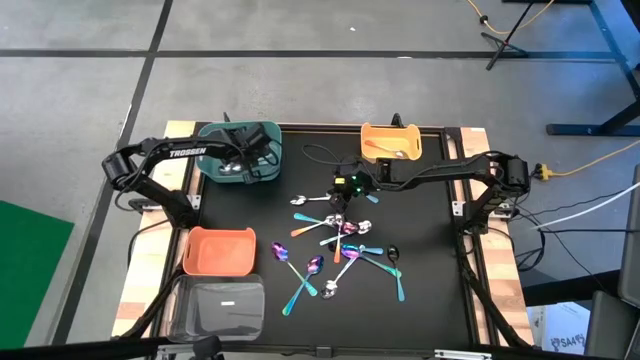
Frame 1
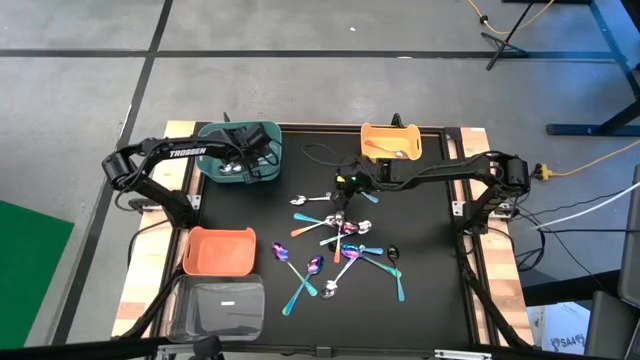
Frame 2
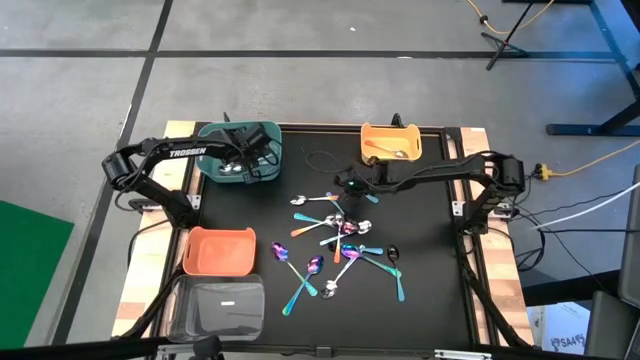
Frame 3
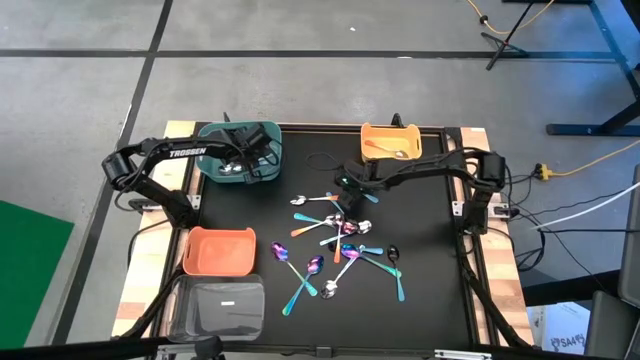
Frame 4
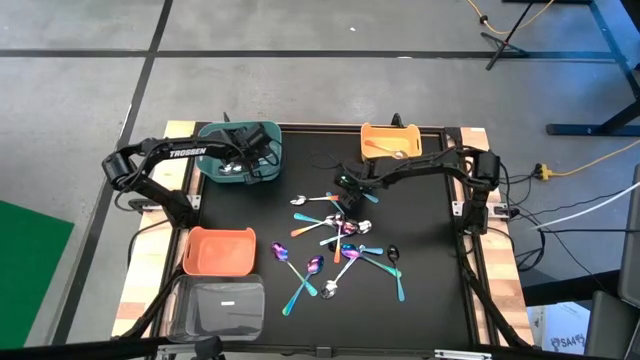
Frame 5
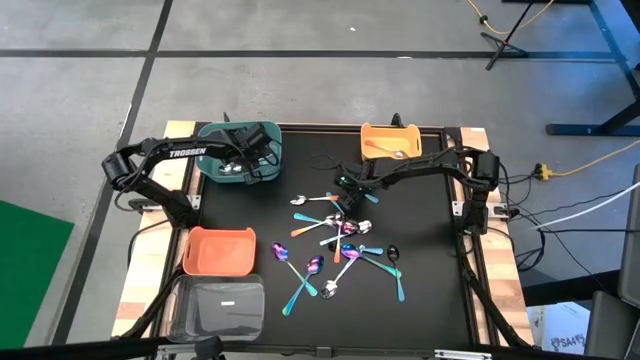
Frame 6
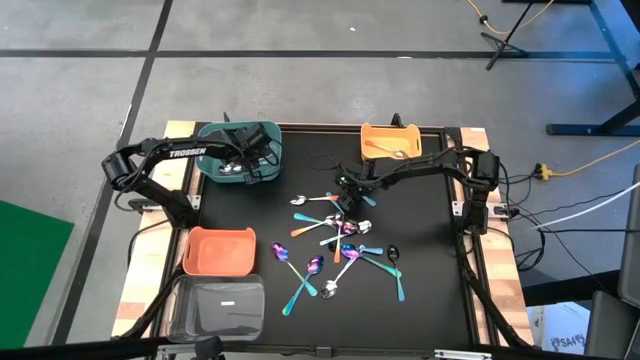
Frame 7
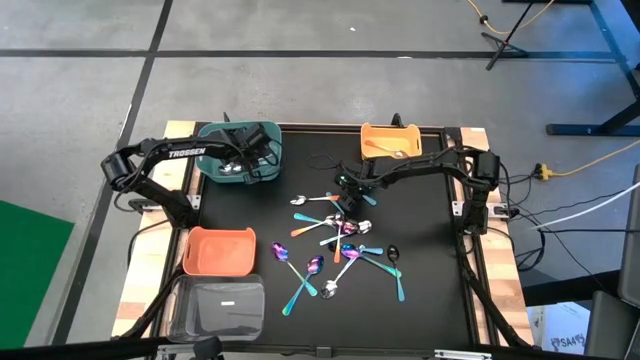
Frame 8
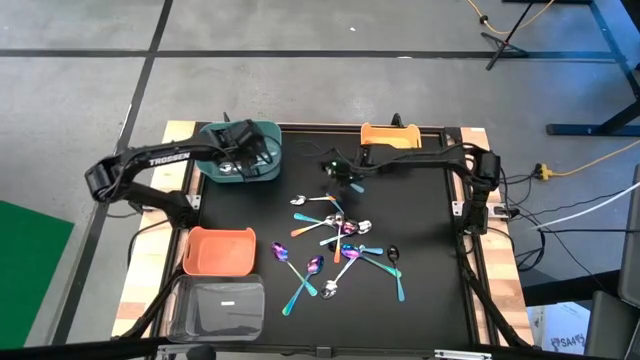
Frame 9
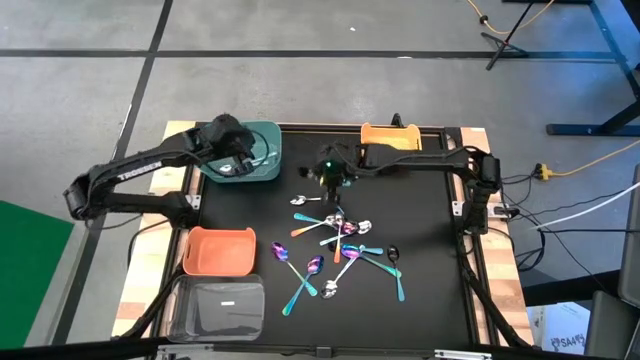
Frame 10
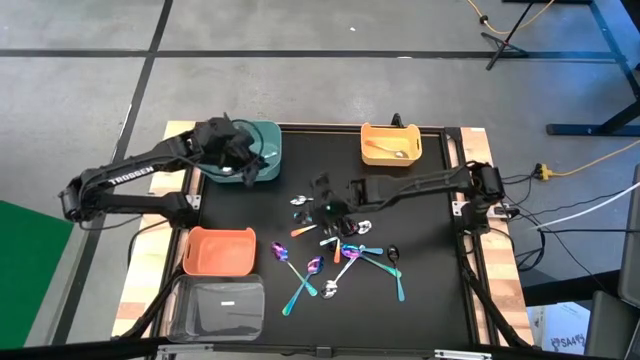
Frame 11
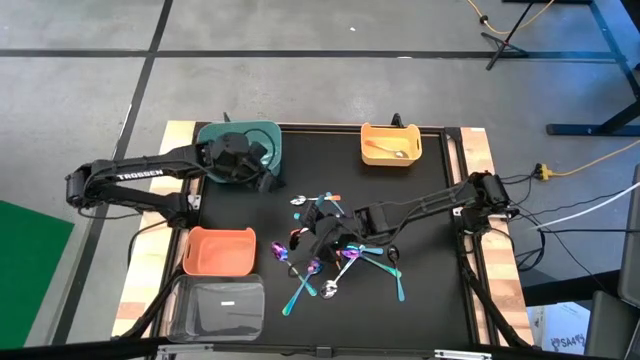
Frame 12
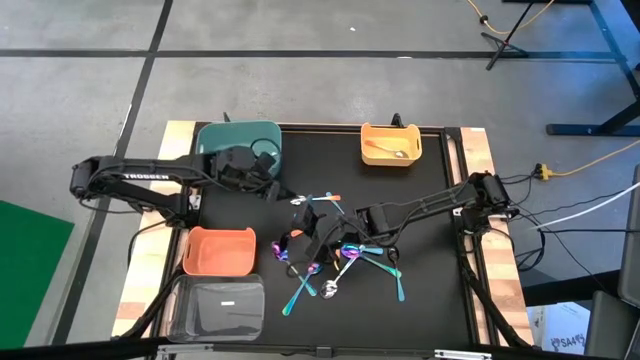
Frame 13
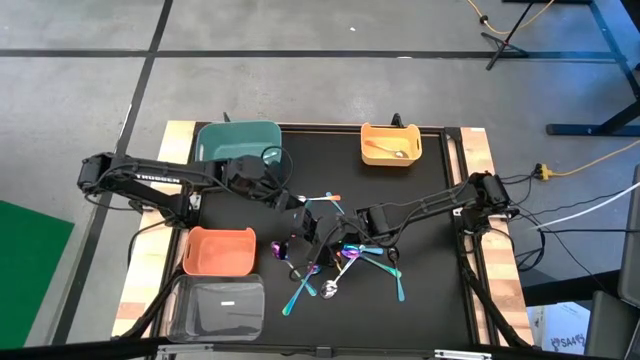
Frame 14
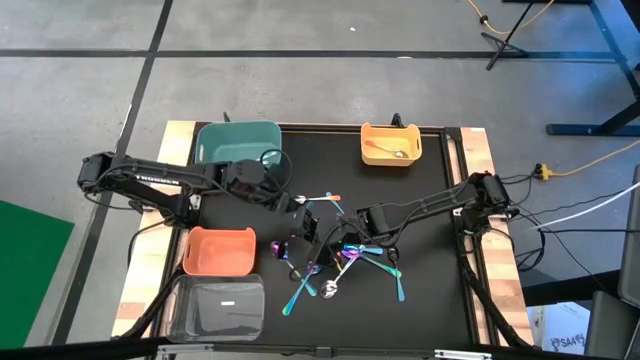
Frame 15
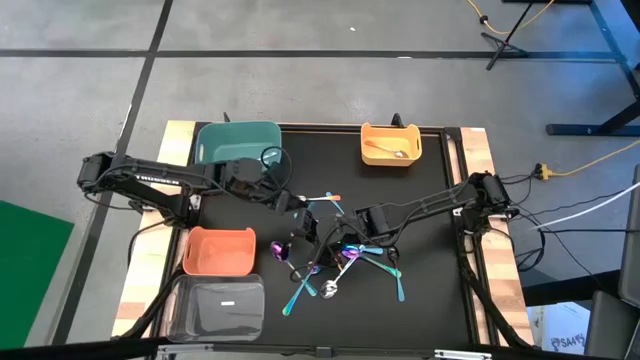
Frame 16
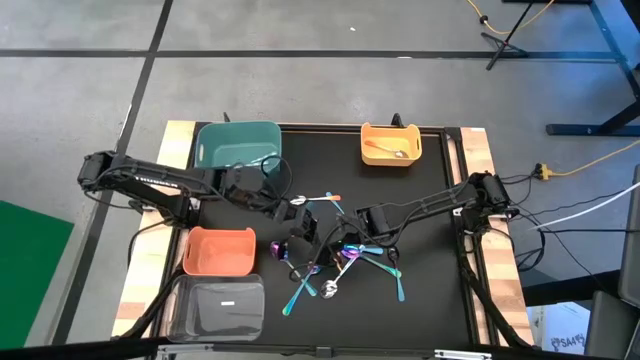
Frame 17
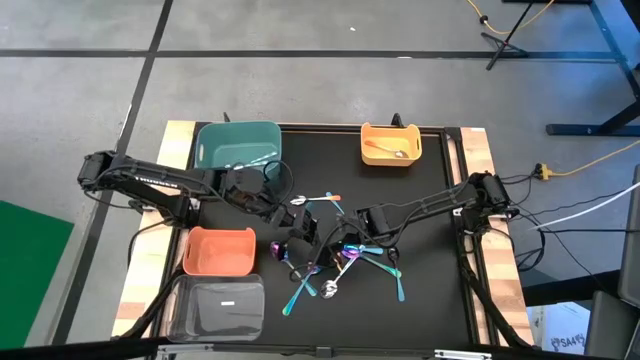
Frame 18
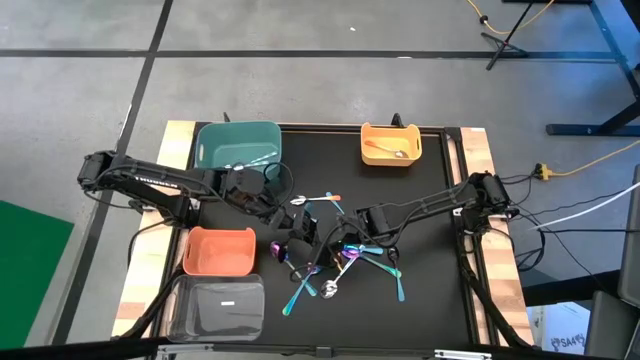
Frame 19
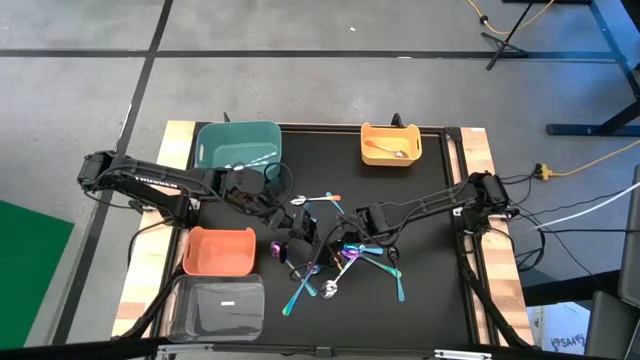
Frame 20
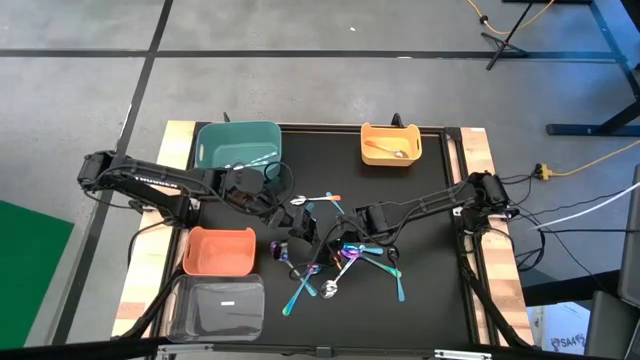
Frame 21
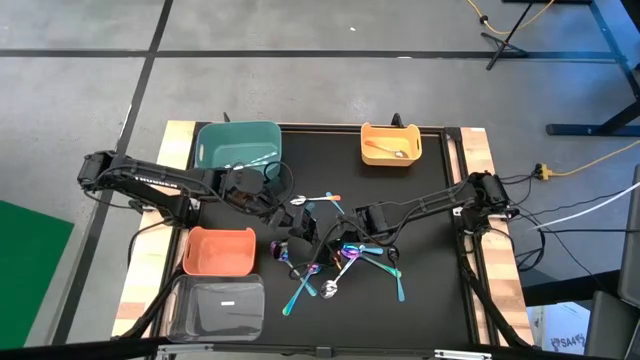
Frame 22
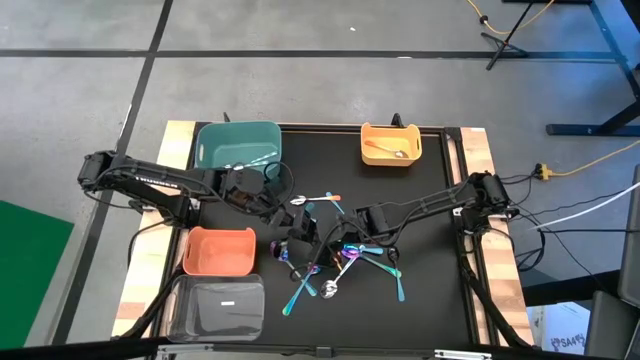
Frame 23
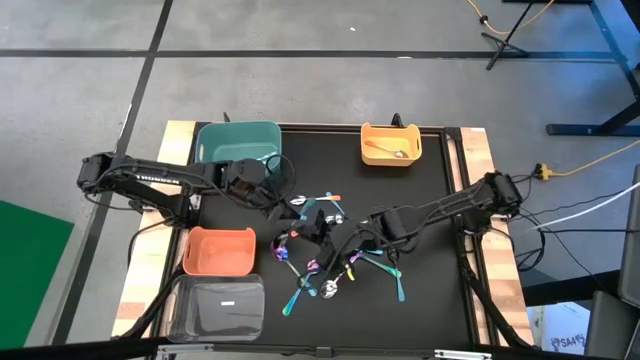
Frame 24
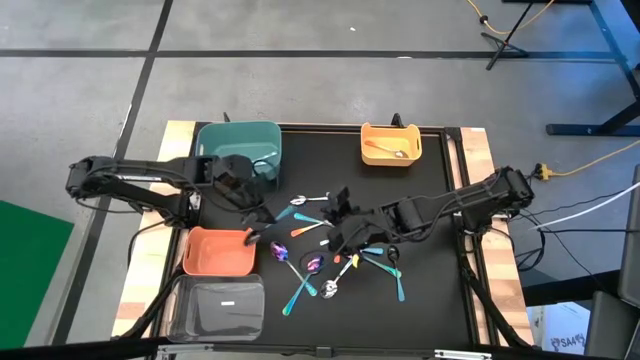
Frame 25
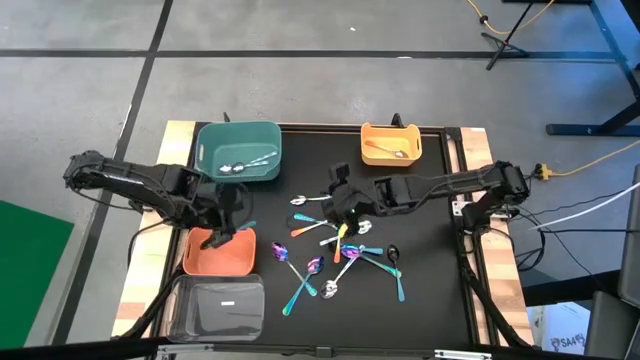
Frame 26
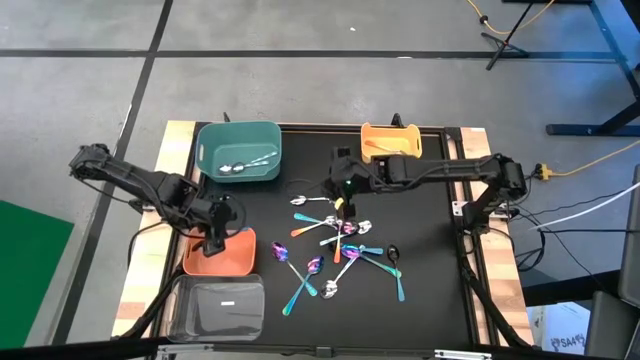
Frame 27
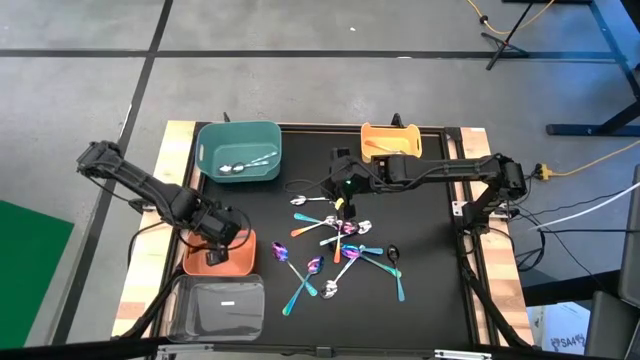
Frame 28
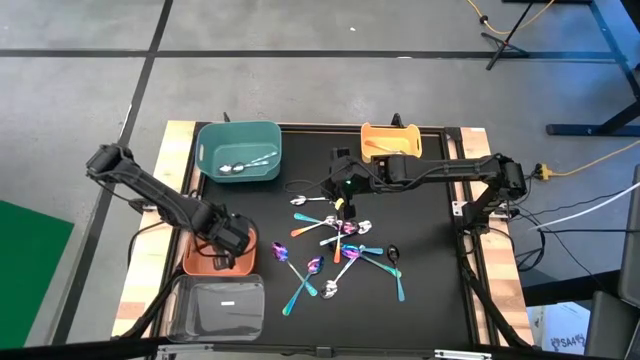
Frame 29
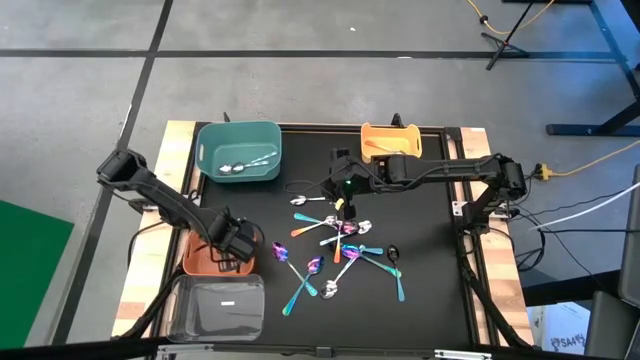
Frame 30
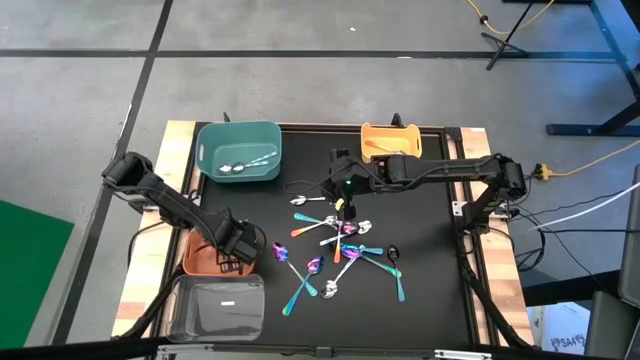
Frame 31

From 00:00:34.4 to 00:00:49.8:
Task: Sort silverware by color (type)
Put the light blue spoon into the orange bin

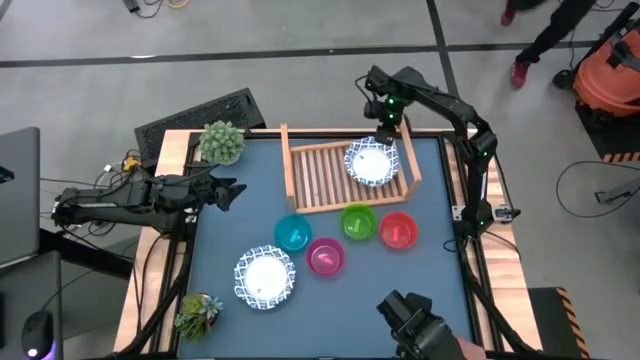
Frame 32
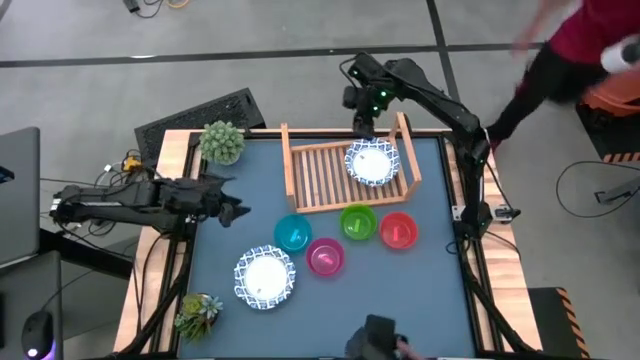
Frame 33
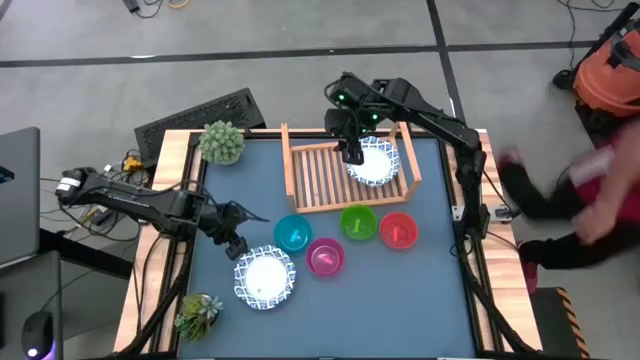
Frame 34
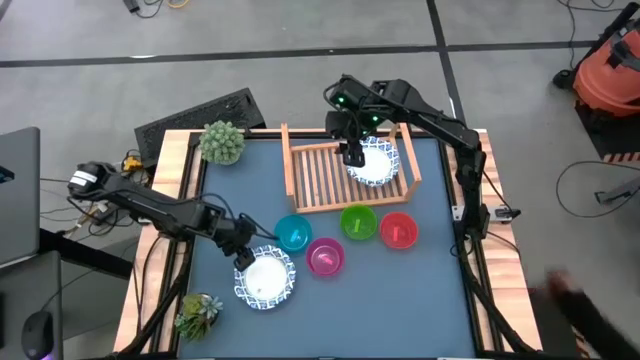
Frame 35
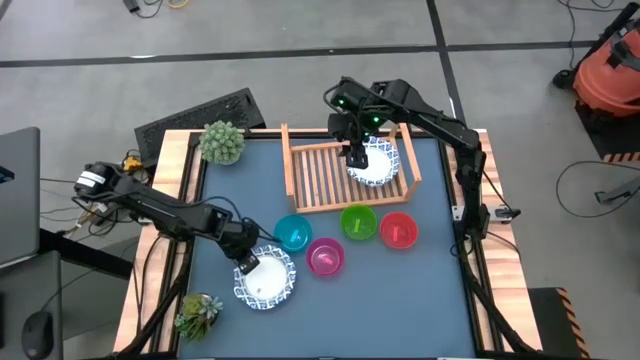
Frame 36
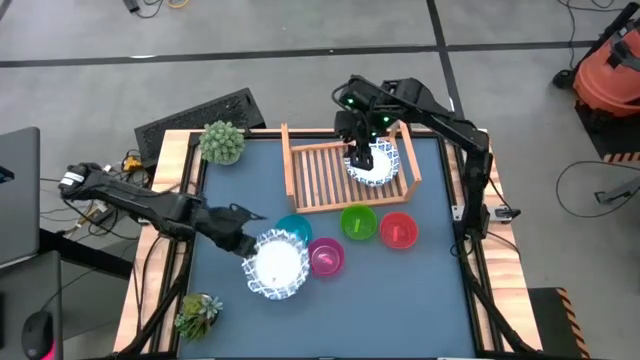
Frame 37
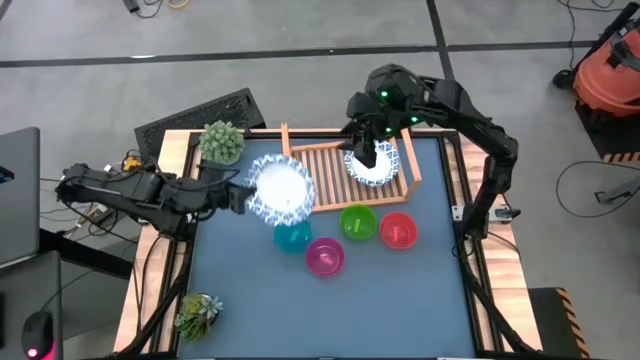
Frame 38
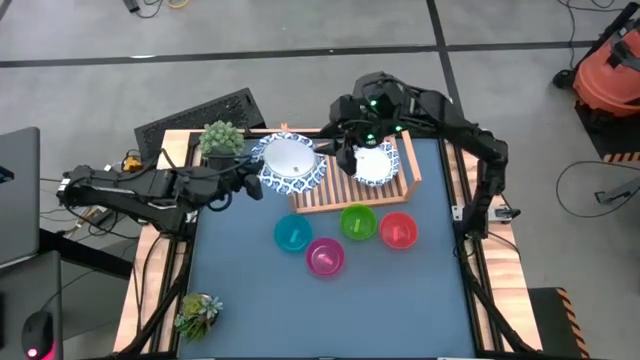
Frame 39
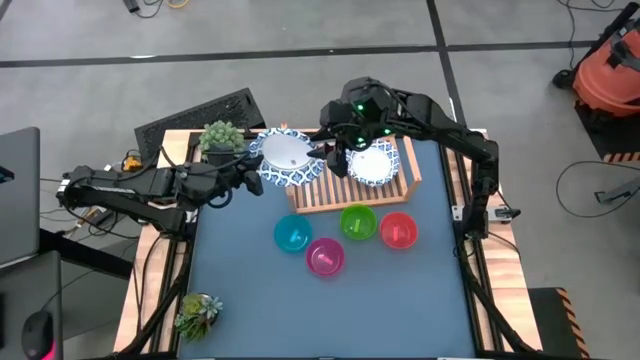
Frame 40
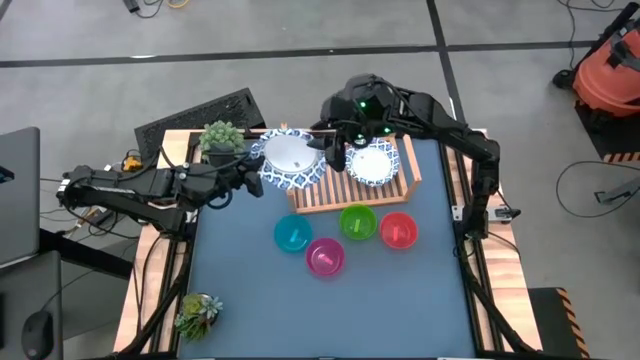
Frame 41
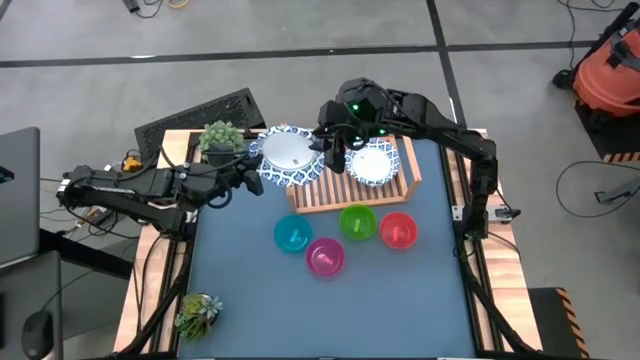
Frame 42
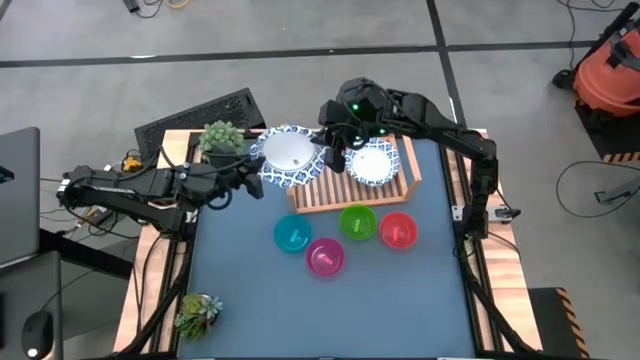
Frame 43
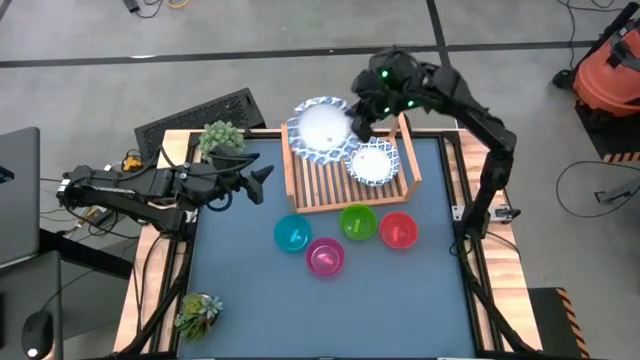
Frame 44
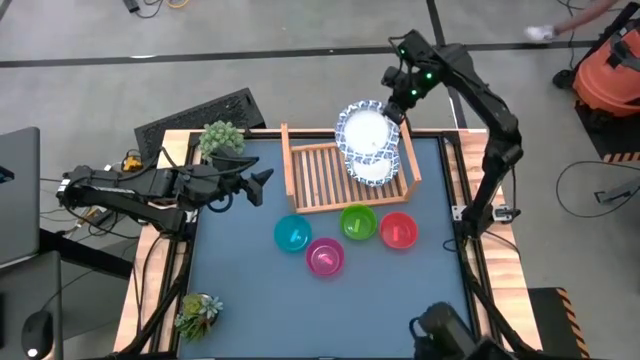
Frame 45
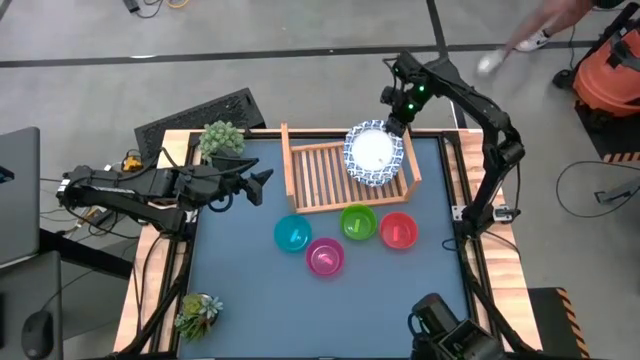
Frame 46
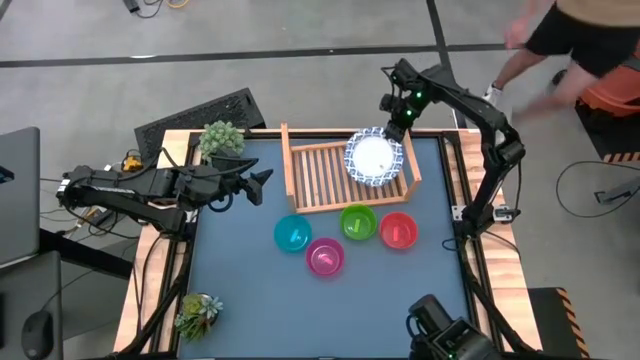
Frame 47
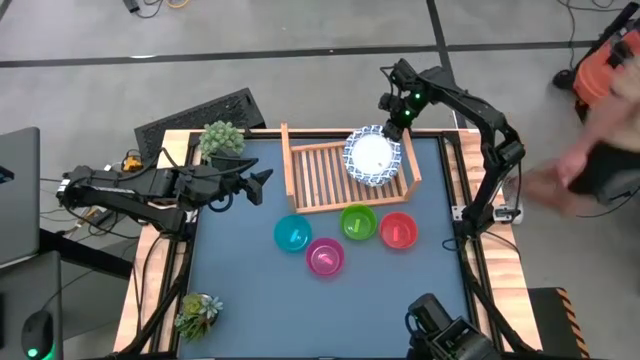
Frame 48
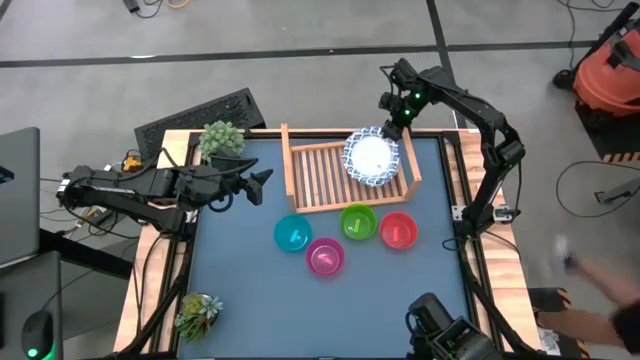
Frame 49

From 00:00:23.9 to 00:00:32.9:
Task: Place and stack bowls onto a shelf
Stack the white bowl on top of the white bowl on the shelf
